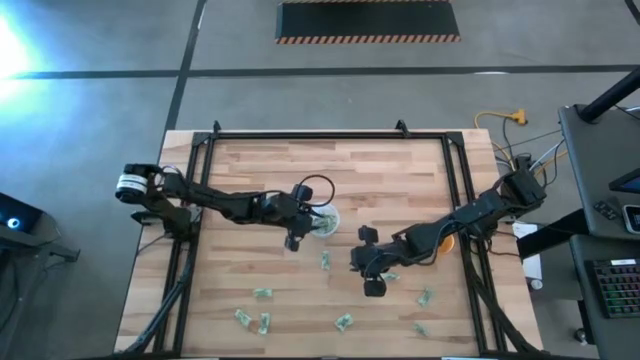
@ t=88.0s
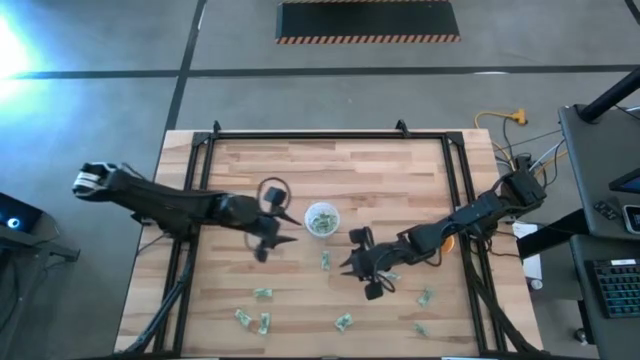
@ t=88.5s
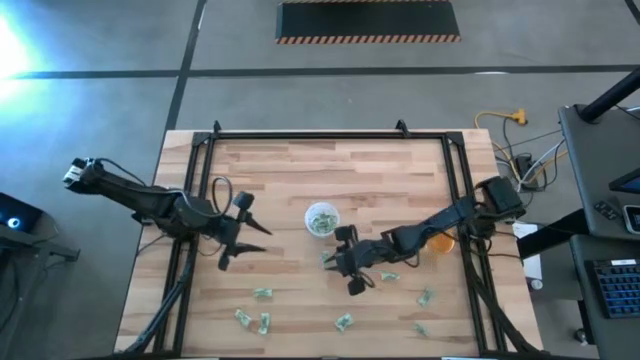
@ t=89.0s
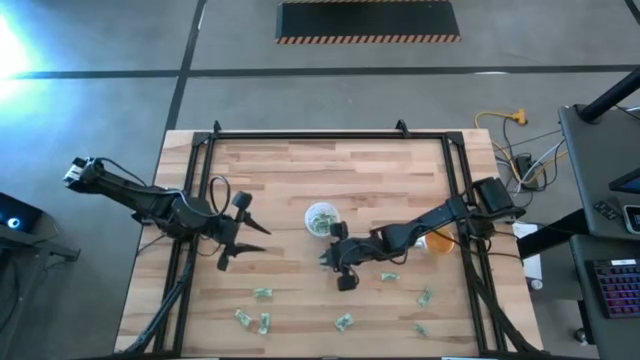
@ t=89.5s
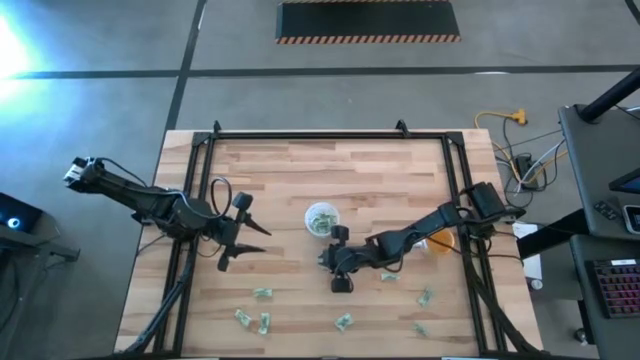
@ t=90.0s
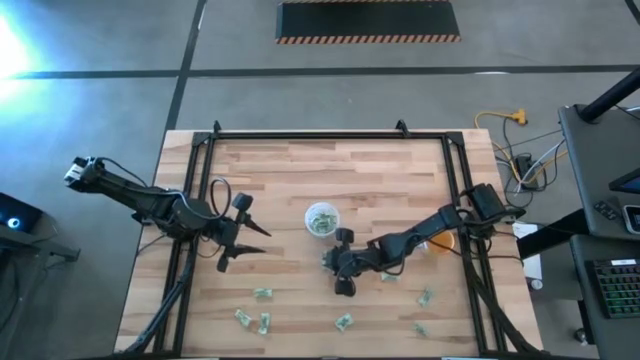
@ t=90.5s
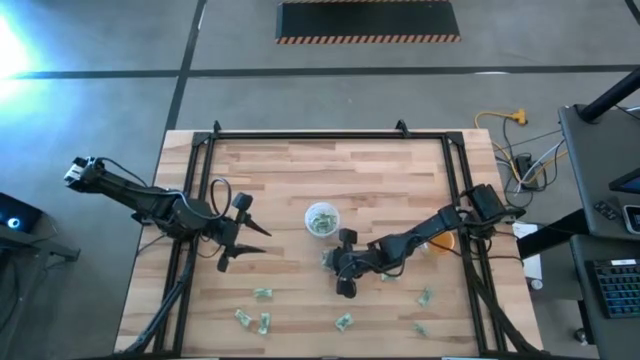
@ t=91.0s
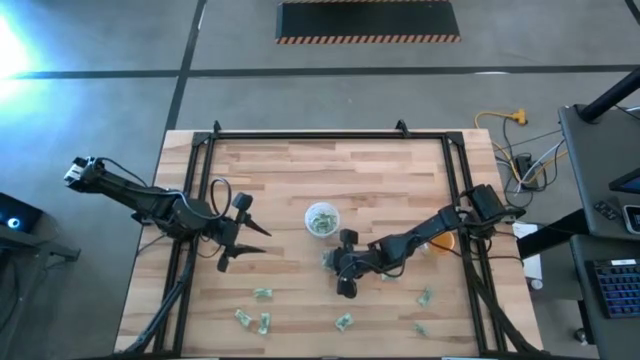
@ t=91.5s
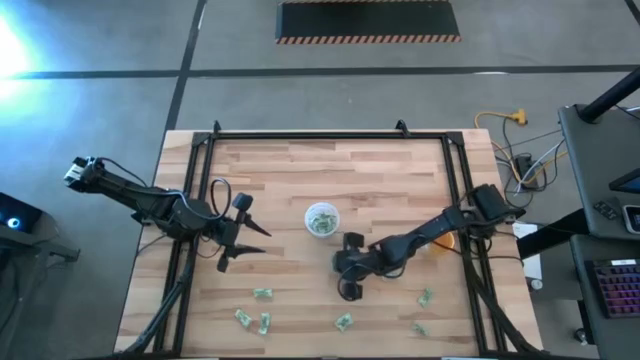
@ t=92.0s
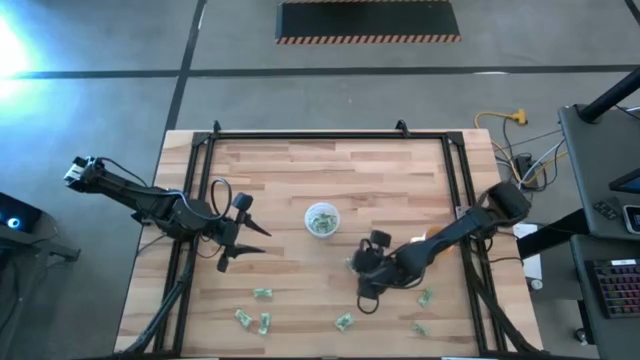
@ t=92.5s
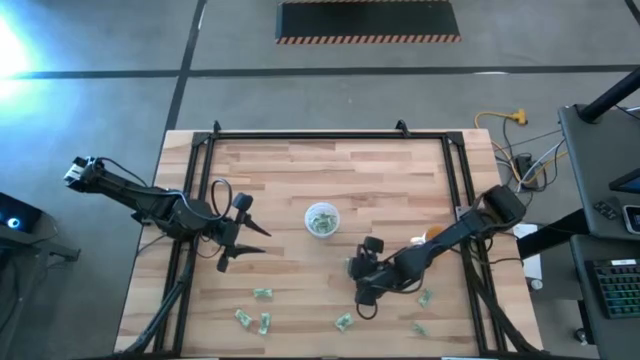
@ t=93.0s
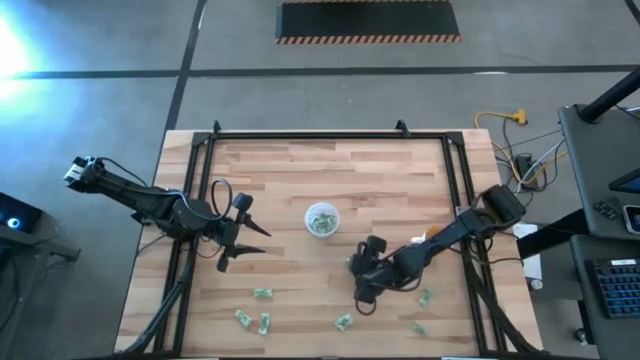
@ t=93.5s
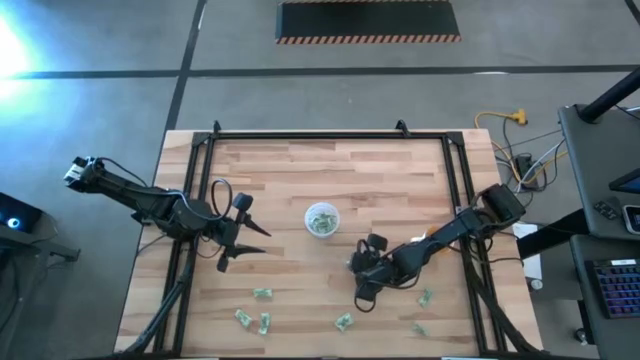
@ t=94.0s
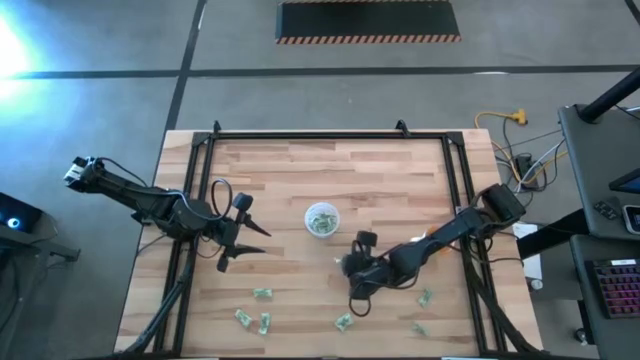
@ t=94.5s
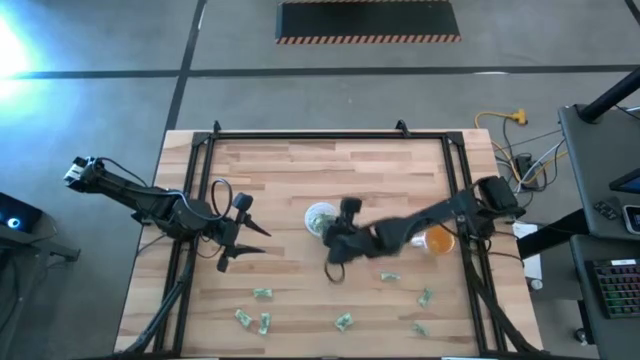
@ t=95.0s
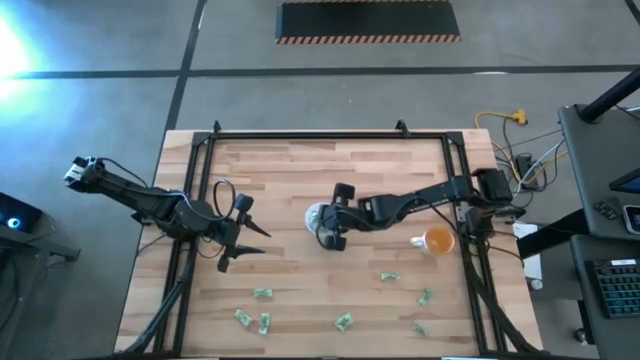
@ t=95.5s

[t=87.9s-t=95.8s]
Task: Pick and place Stevia / Truvia into bins
Put the light green stevia packet into the transparent container

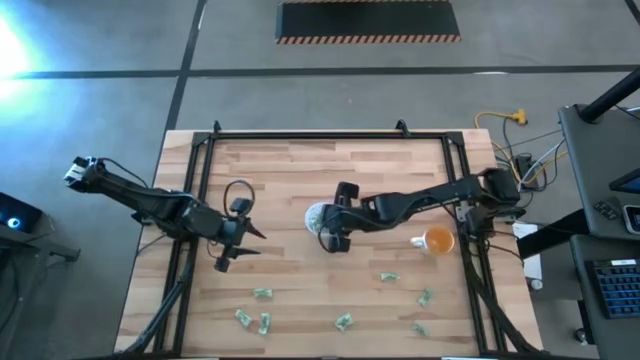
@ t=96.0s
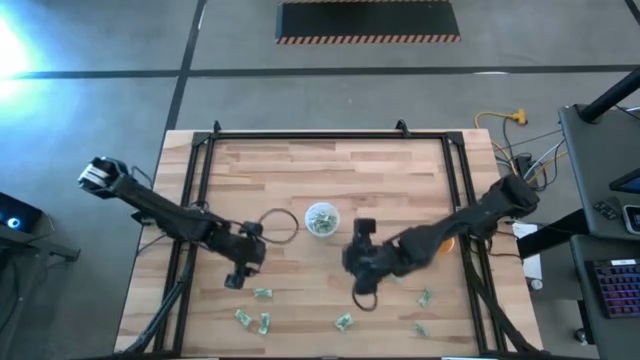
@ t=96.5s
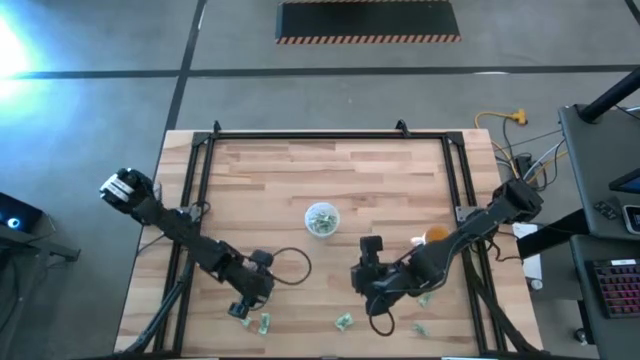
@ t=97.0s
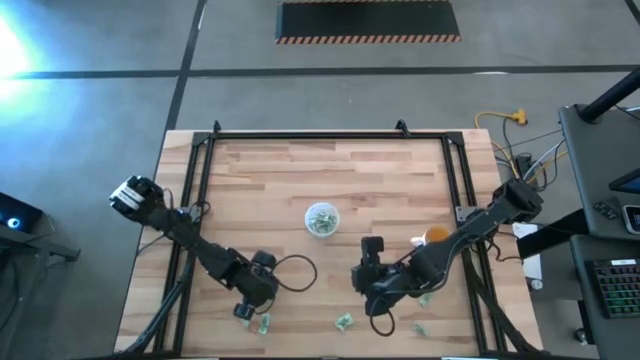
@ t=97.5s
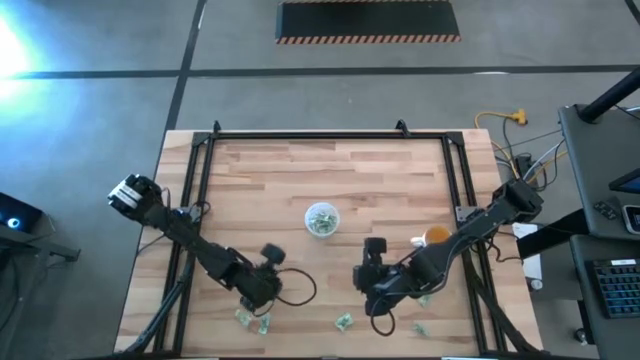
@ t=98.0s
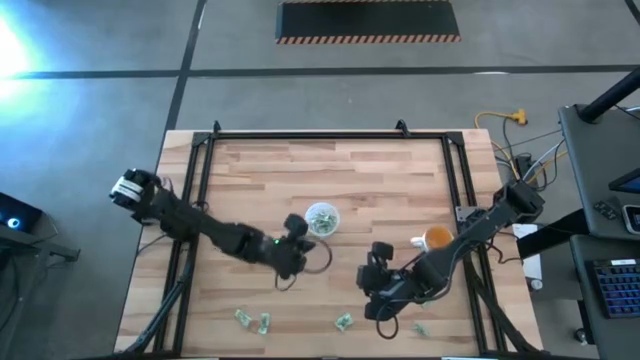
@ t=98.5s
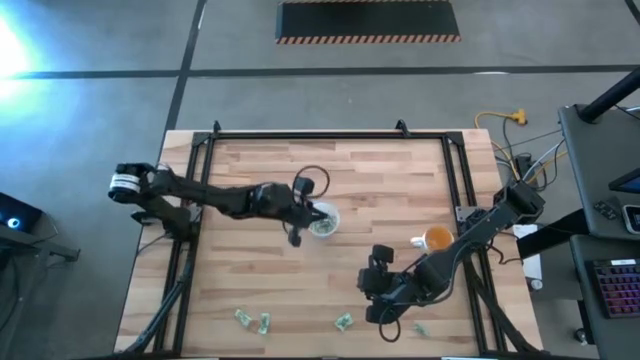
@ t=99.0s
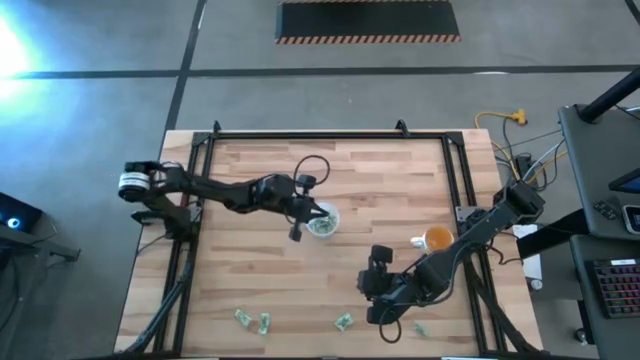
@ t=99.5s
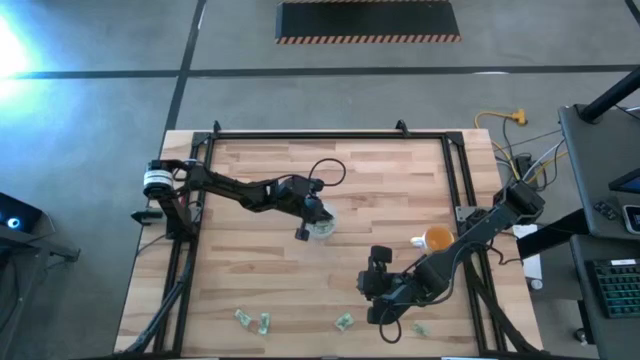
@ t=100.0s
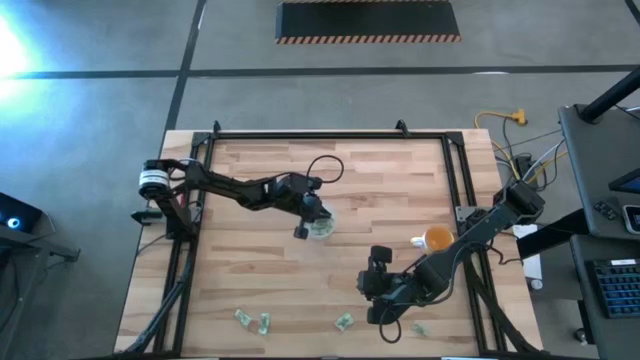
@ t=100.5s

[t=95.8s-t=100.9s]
Put the light green stevia packet into the transparent container

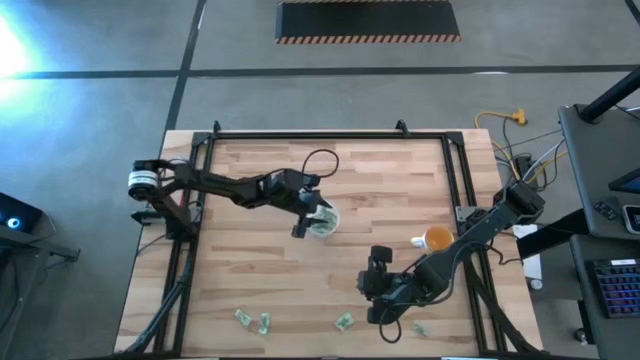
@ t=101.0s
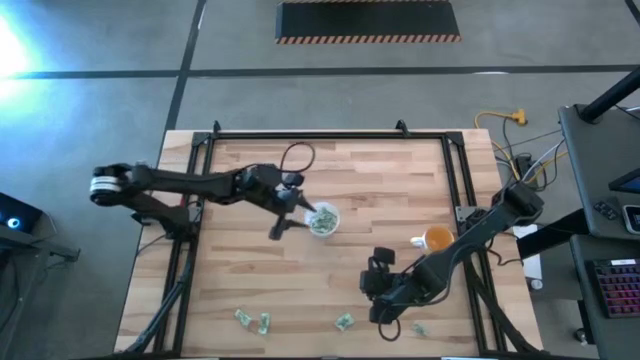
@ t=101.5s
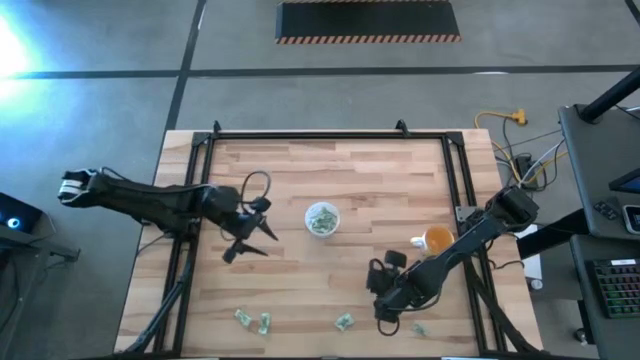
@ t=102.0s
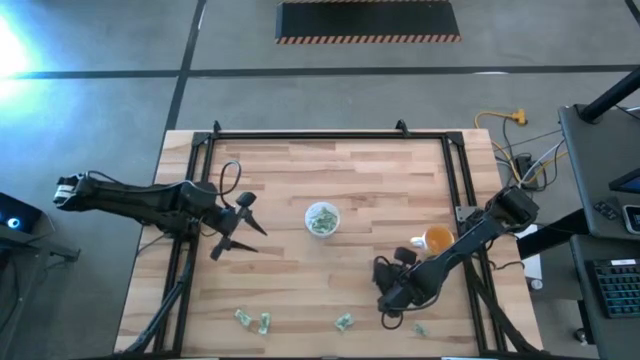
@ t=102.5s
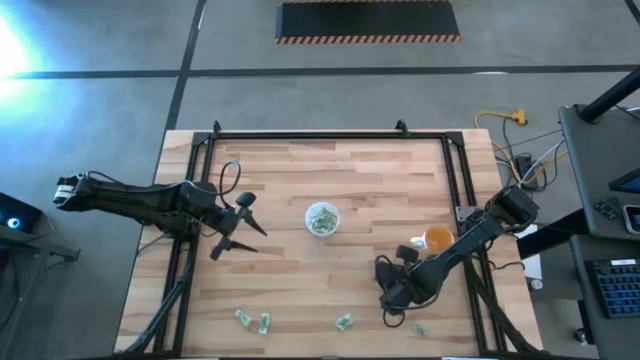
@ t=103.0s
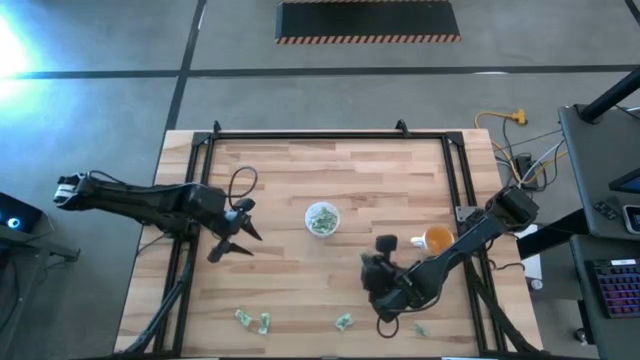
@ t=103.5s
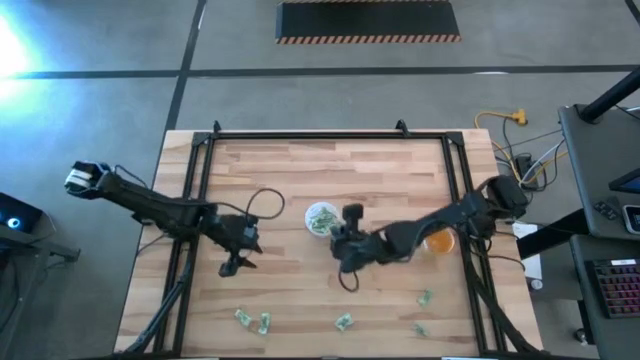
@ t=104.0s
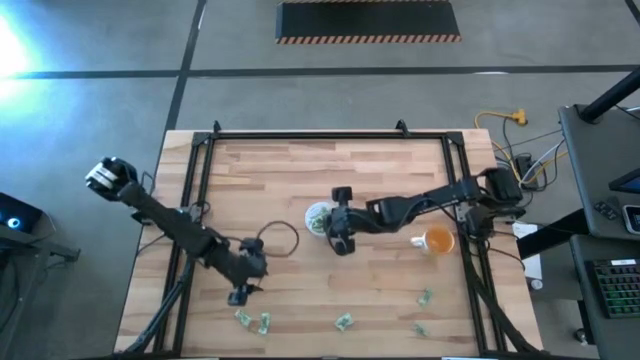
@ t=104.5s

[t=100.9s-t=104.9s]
Put the light green stevia packet into the transparent container

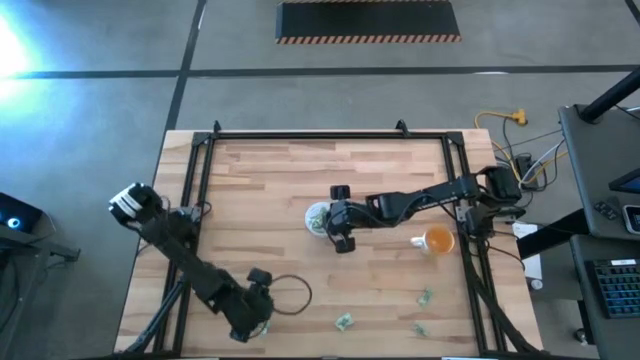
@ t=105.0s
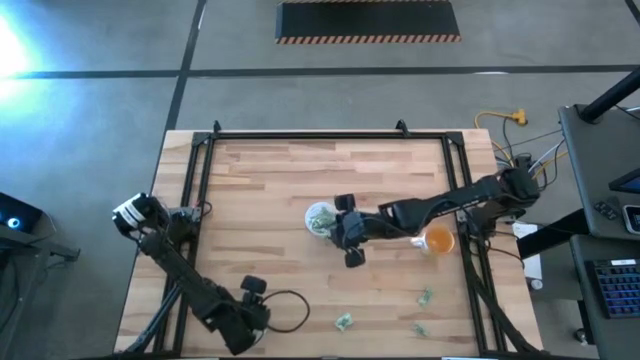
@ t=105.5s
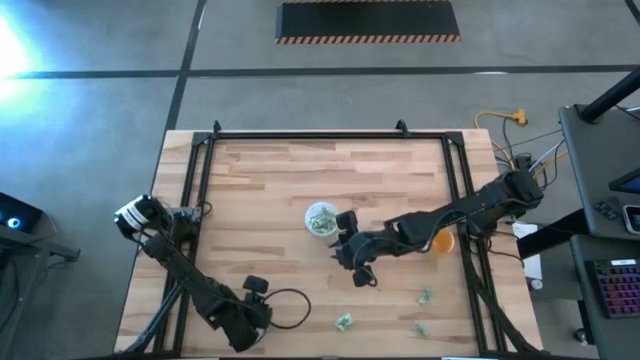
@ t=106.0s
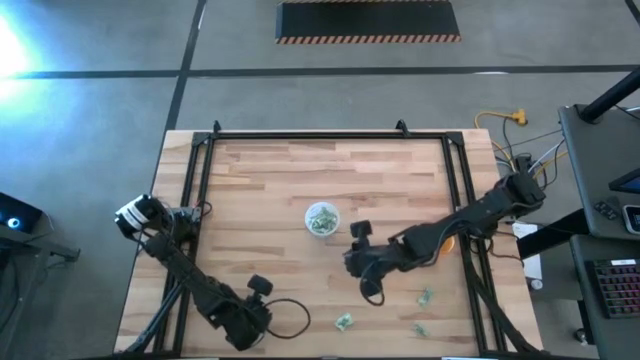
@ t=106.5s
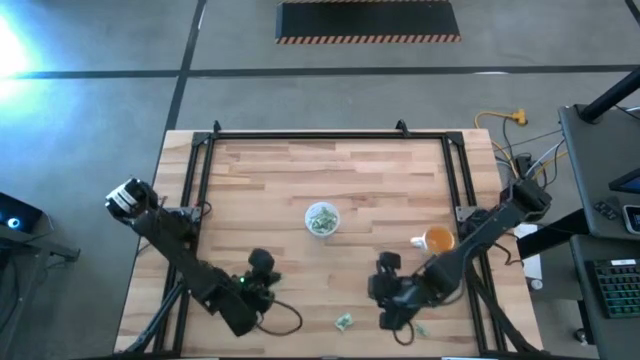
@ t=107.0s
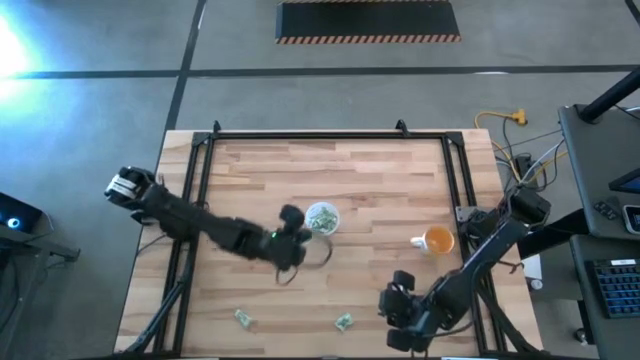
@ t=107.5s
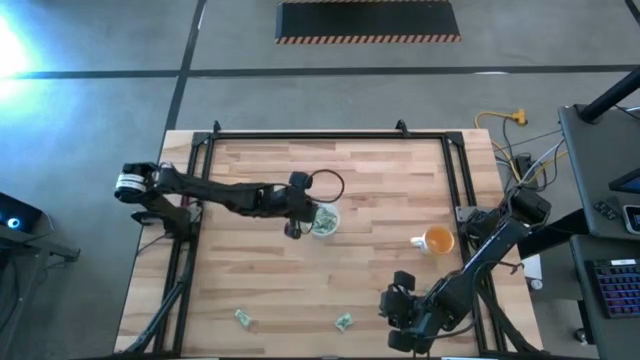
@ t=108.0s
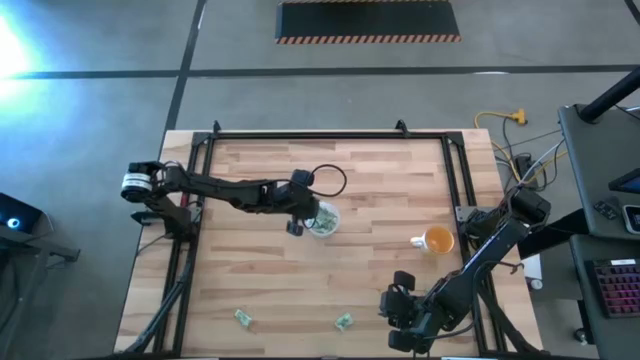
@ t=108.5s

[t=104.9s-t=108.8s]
Put the light green stevia packet into the transparent container
